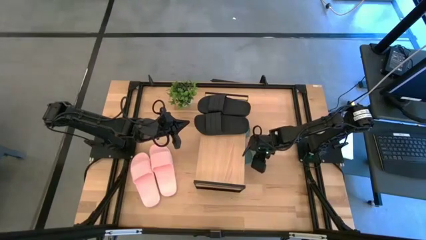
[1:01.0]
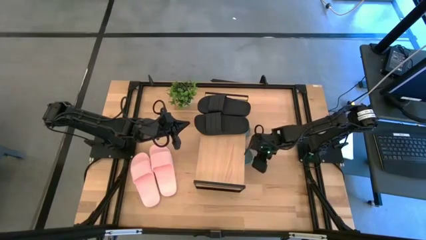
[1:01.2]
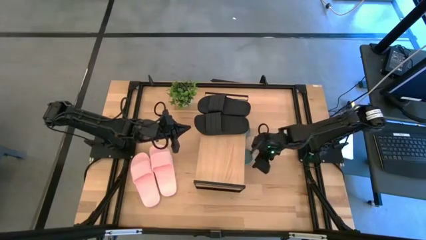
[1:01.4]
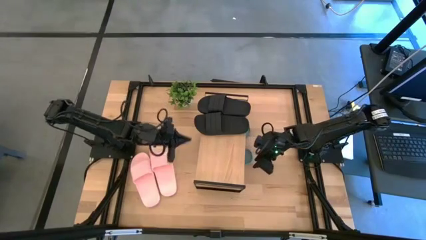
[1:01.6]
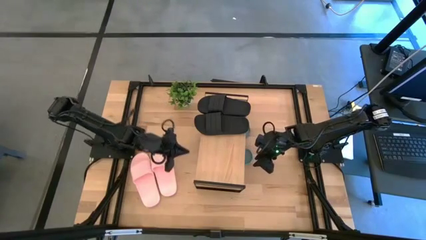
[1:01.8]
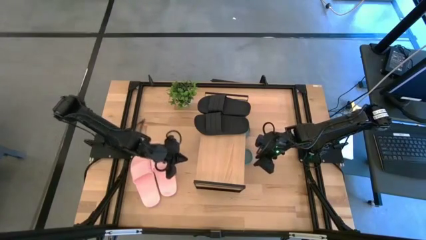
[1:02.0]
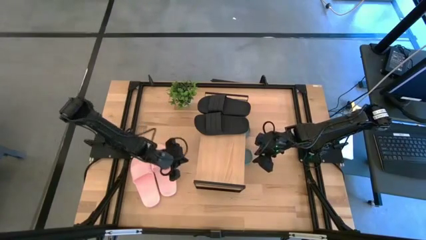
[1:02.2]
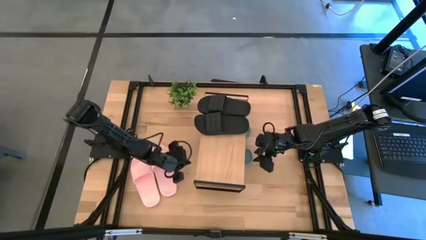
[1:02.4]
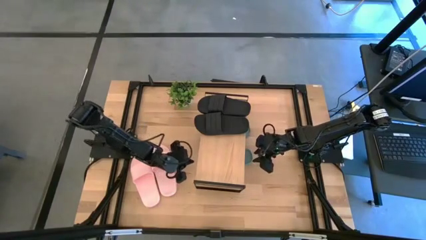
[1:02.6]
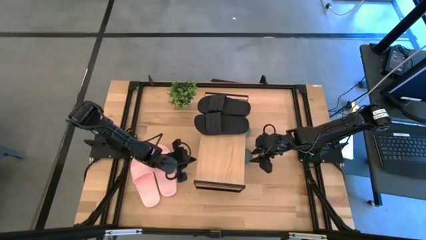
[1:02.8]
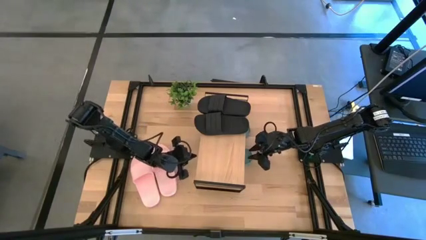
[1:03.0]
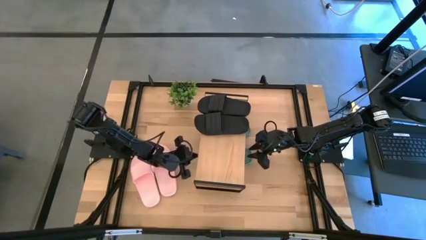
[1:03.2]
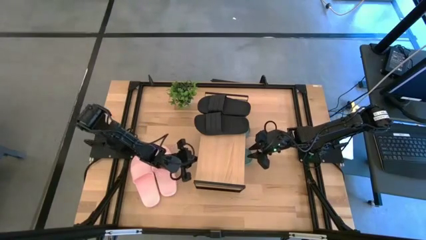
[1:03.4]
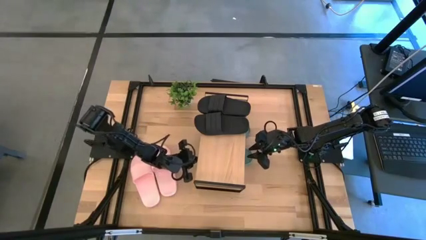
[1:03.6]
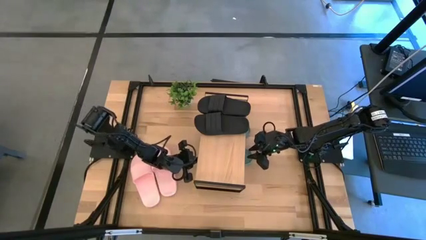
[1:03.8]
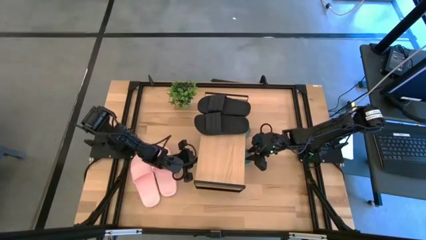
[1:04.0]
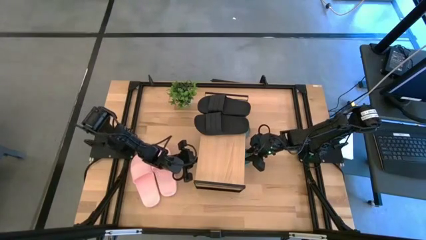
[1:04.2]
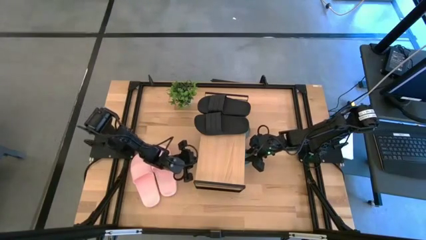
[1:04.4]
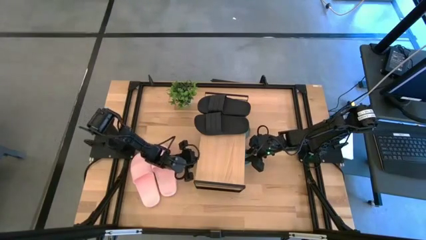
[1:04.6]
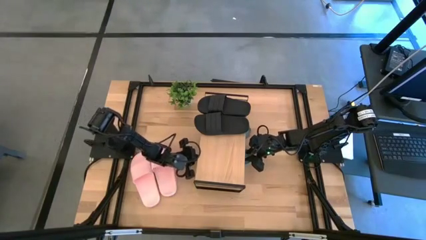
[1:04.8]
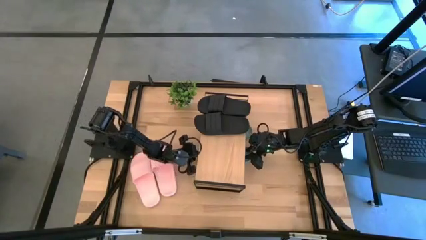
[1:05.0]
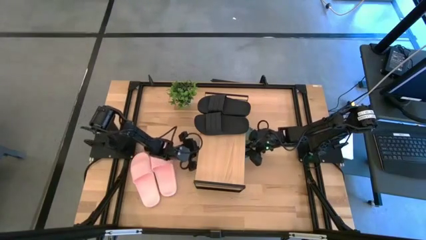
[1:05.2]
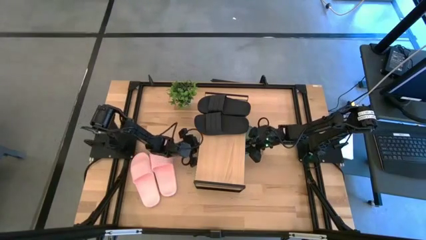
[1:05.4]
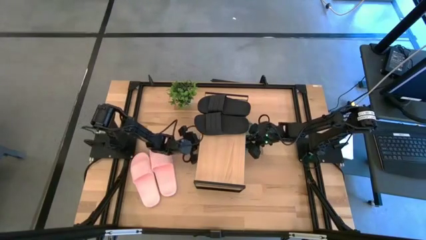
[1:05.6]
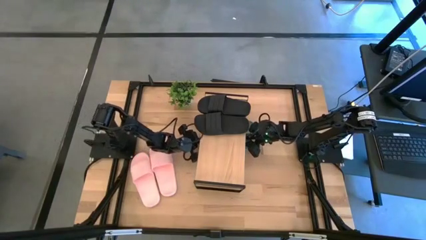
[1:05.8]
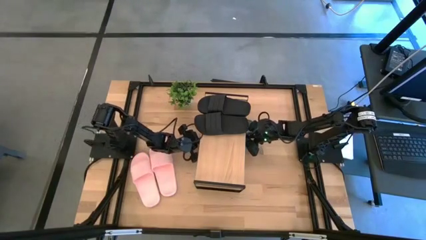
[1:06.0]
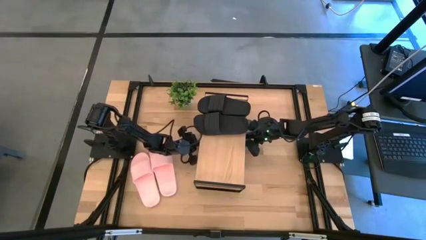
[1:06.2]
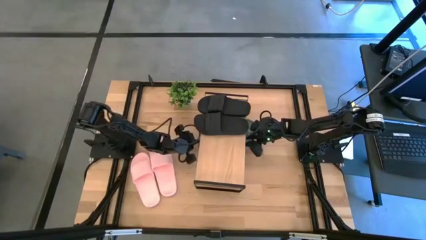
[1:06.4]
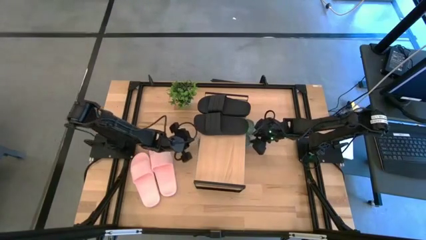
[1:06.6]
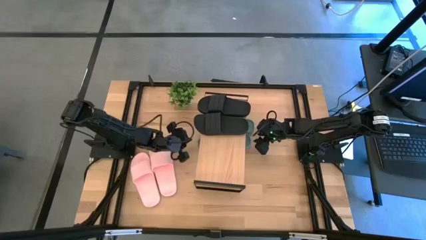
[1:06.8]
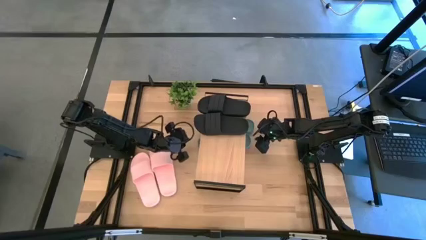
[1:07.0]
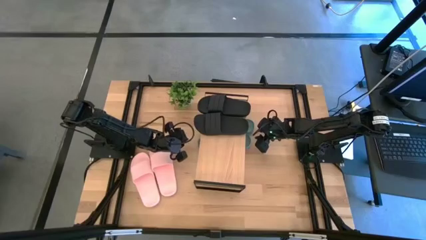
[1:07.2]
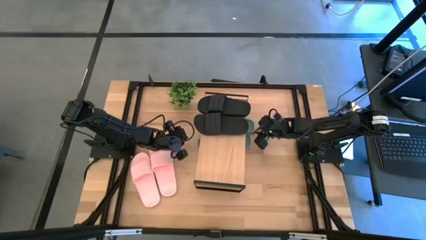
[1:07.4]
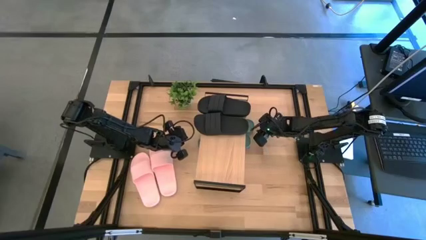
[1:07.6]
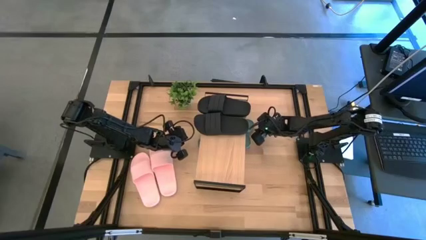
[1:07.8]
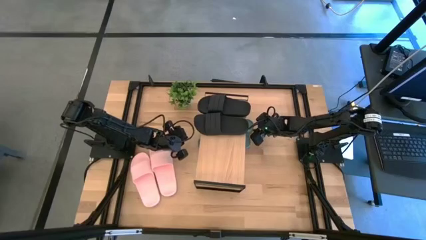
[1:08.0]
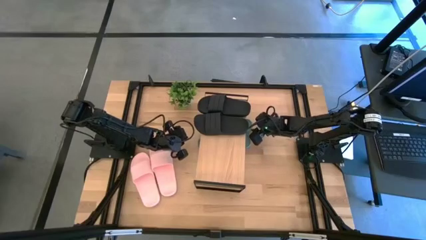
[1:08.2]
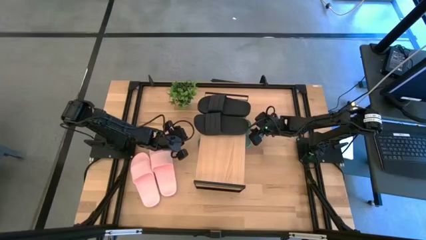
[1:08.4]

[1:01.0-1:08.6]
Task: Pick and place slides into the shelf
Adjust the green slides under the shelf

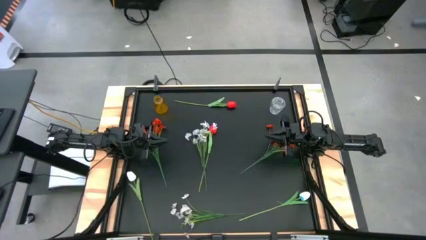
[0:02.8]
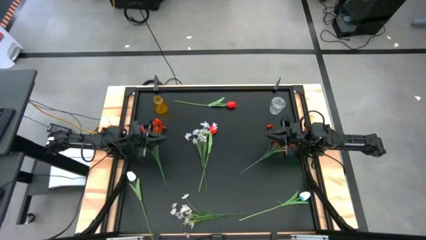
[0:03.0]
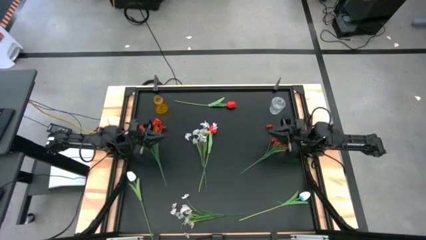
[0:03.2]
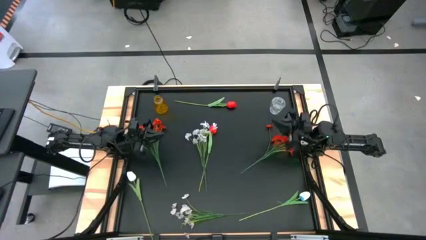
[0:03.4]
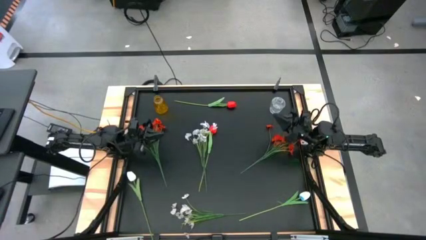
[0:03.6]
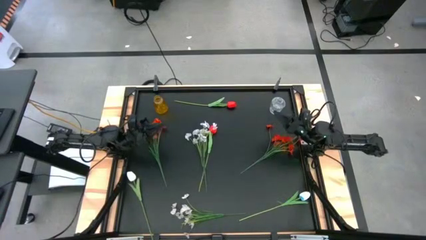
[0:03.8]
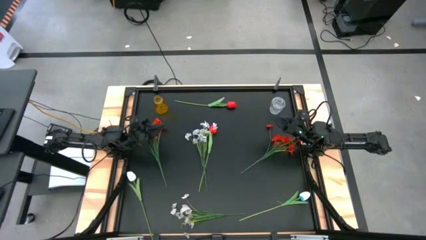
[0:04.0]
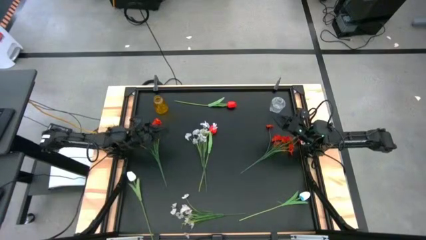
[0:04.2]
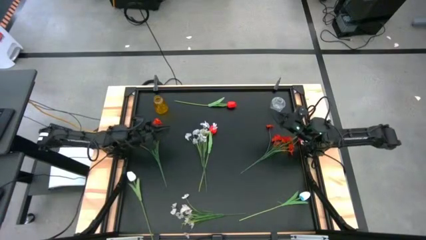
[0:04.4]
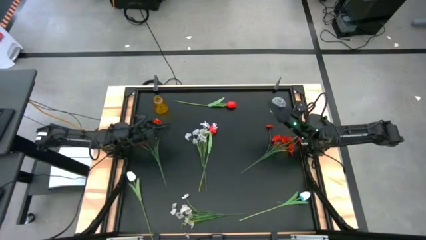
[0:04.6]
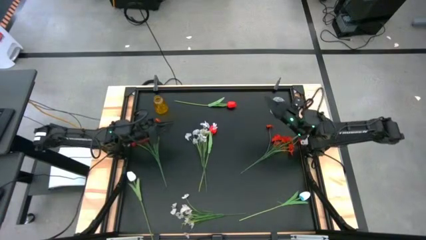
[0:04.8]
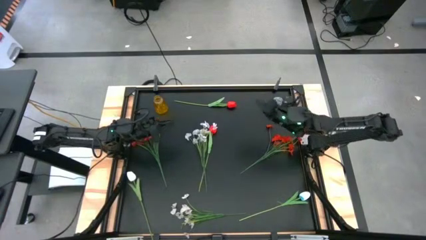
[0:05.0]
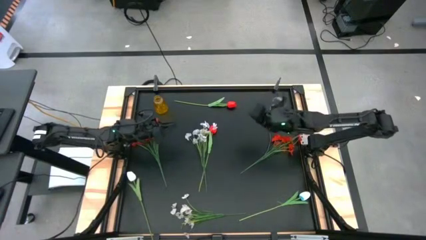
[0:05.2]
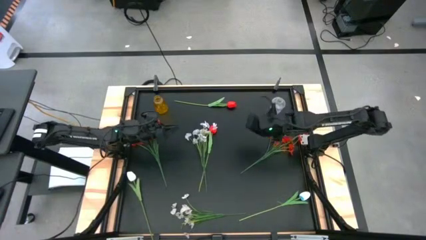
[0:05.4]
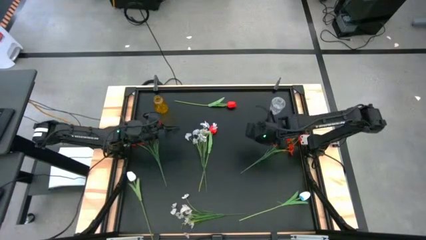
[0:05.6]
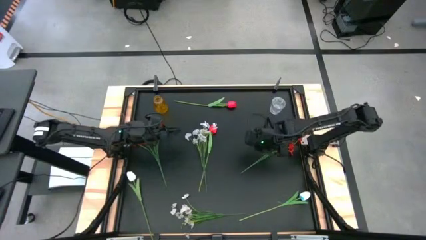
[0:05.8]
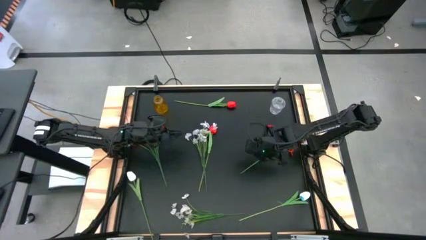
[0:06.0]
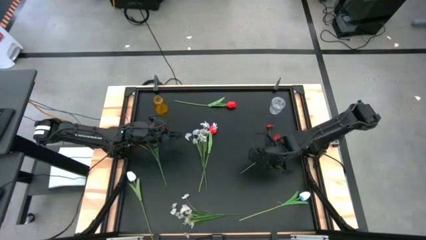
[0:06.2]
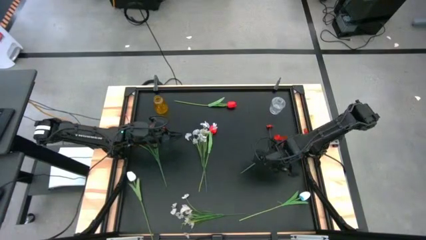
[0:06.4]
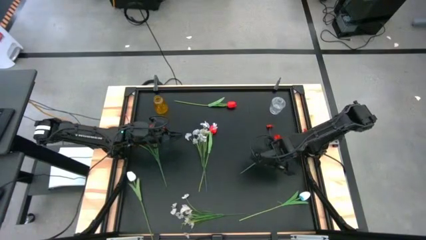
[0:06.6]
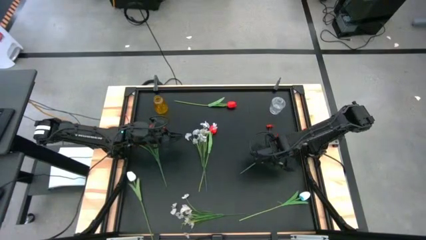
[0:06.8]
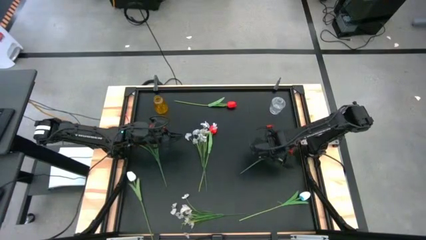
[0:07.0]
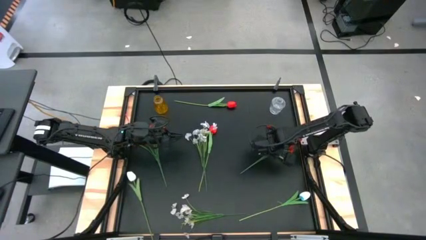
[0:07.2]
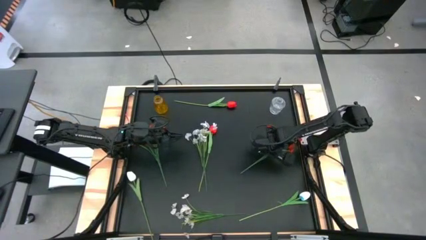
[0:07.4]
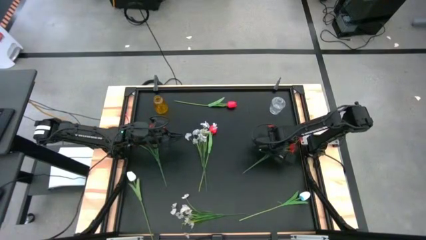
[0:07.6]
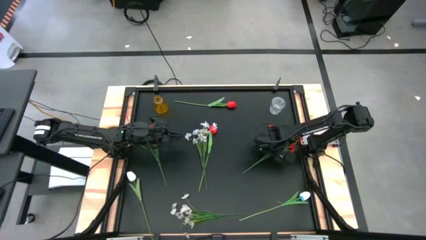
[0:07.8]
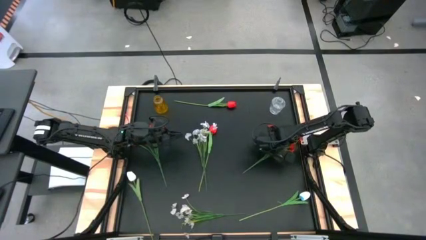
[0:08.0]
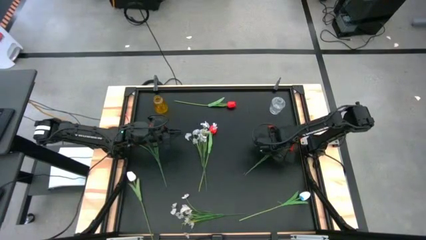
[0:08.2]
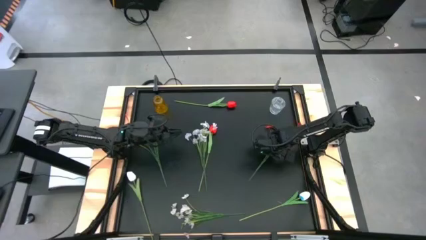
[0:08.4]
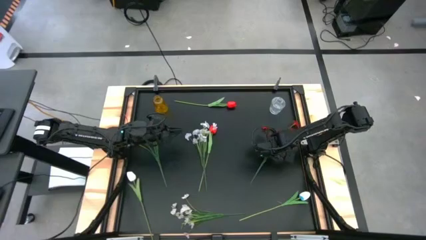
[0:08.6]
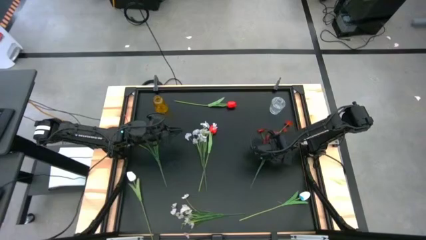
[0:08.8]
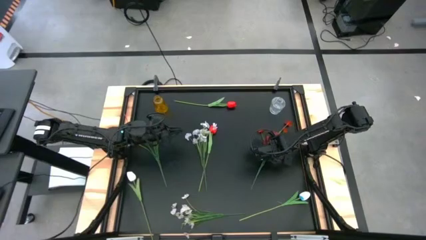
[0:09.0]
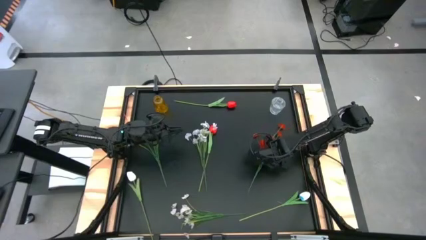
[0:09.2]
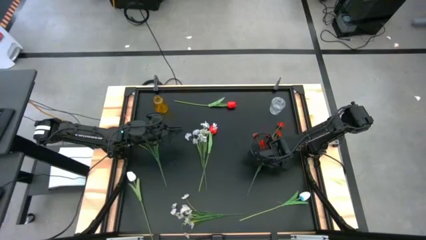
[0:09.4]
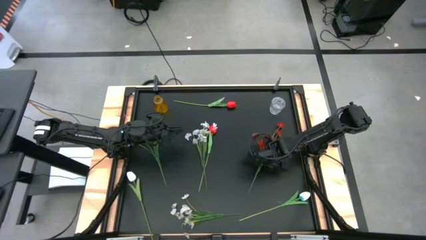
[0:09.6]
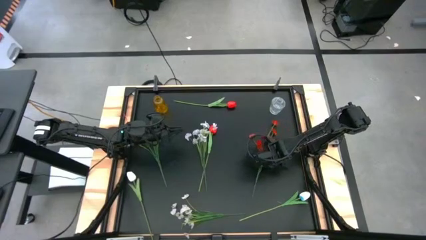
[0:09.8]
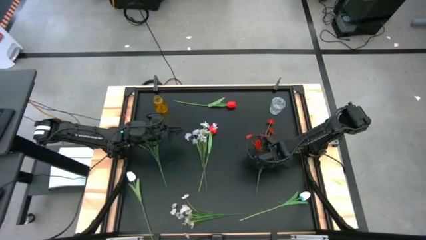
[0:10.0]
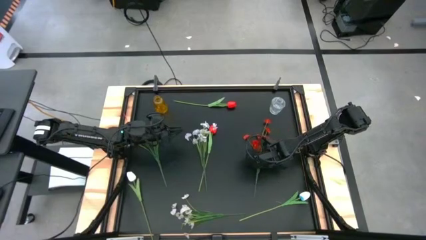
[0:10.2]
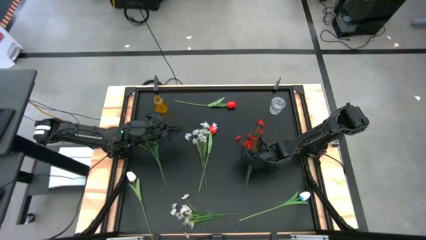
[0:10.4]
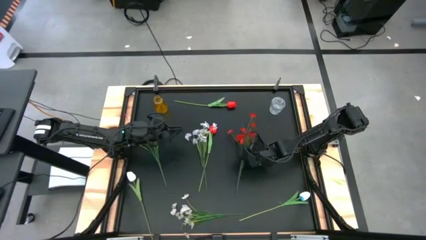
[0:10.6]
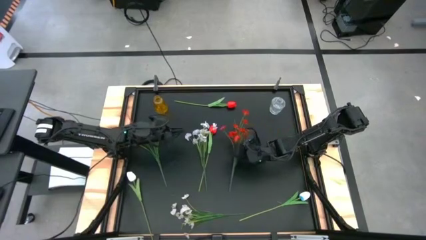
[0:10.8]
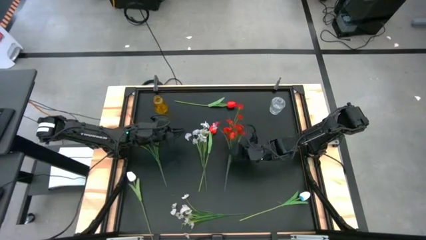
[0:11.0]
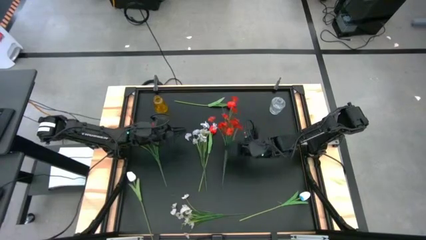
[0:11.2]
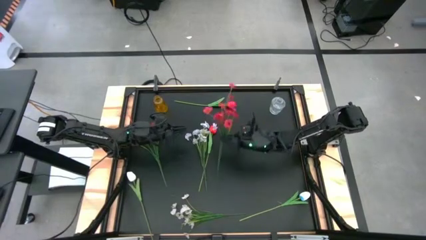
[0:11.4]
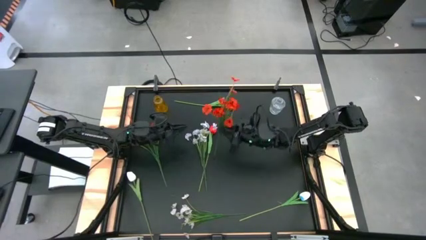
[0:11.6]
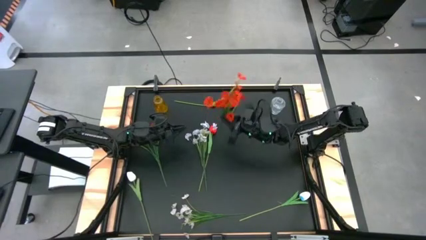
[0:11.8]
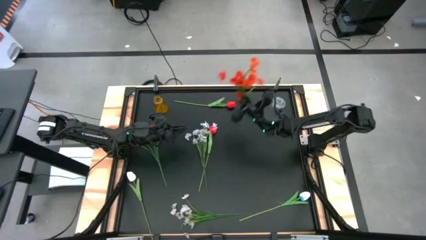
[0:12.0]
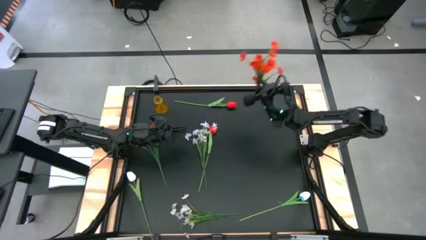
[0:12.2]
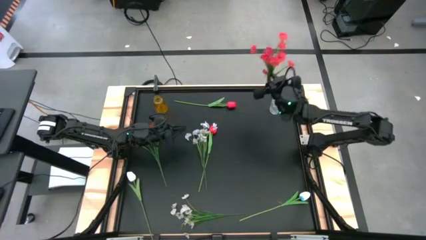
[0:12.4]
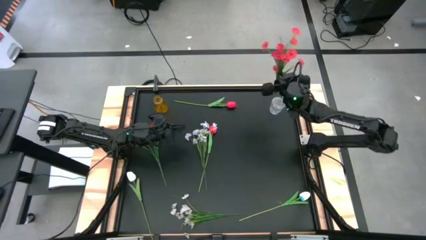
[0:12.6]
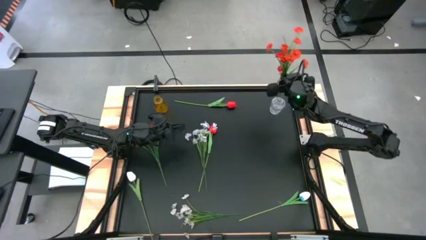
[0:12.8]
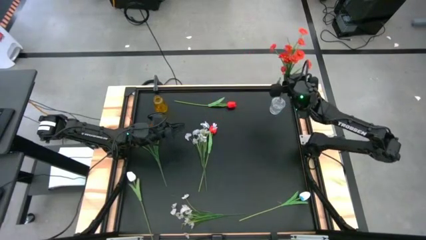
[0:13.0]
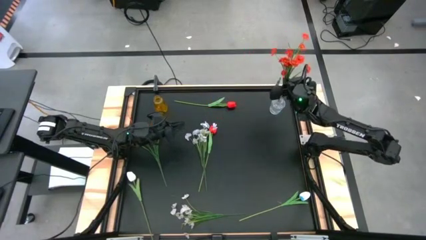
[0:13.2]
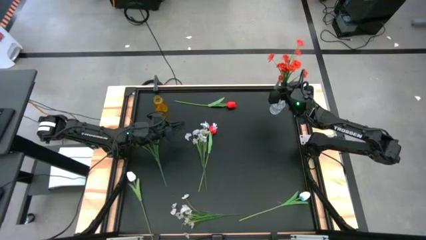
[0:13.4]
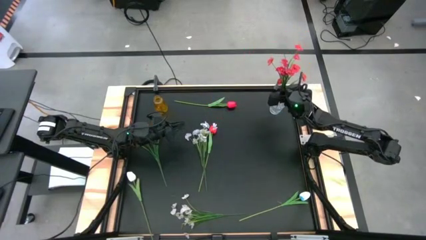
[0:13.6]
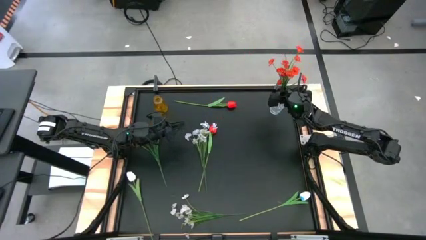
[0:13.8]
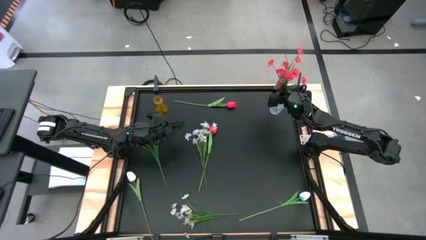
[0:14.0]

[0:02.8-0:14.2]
Task: Sort flowers into vase by color
Put the right red flower into the transparent vase
